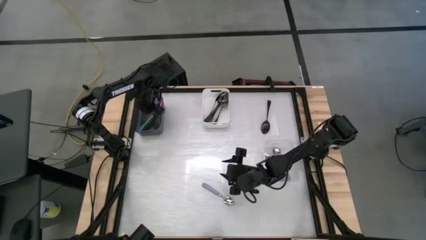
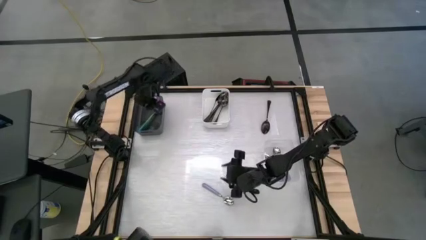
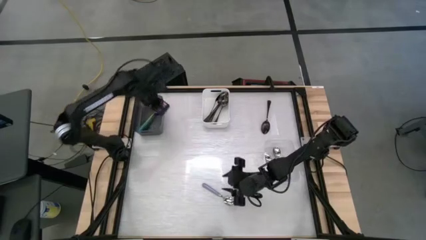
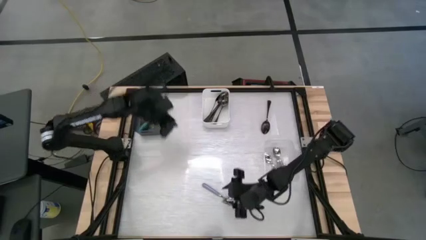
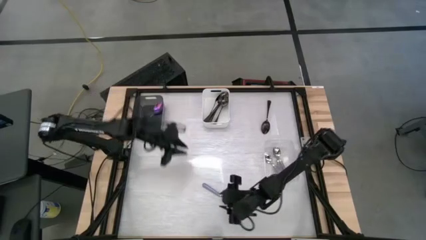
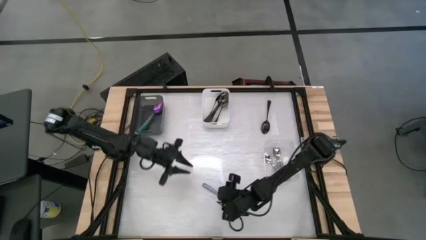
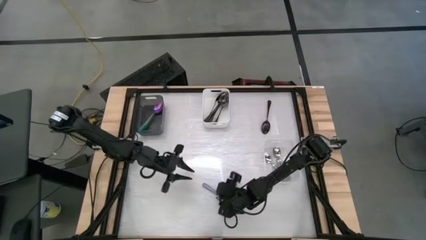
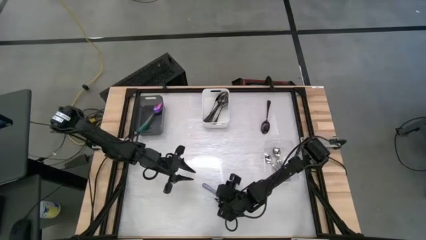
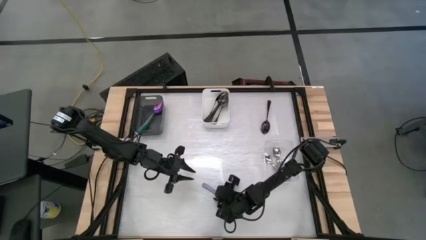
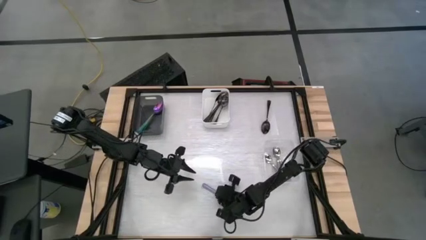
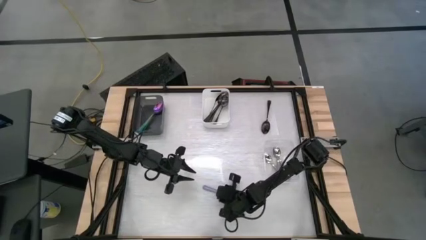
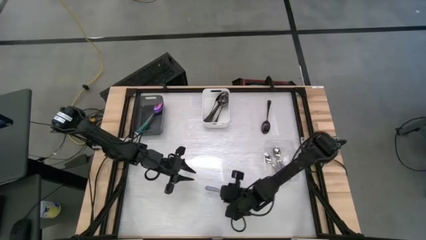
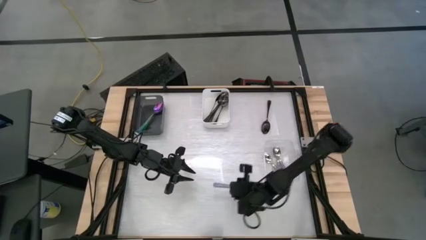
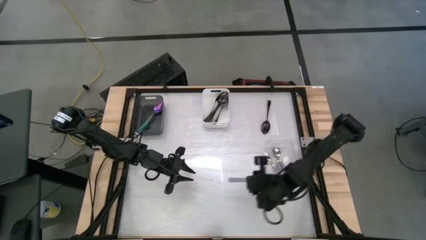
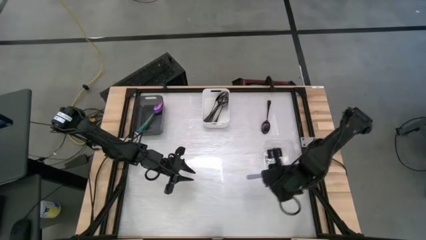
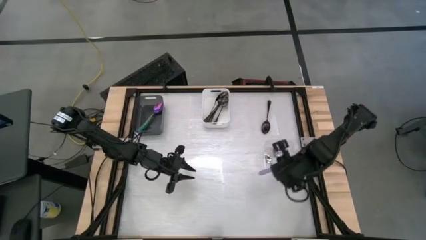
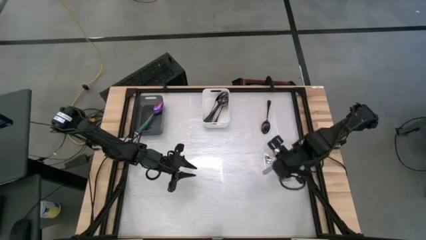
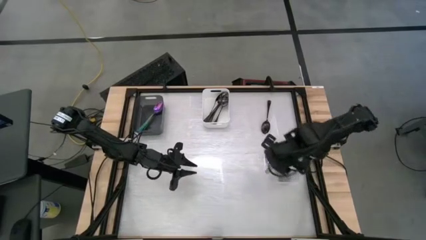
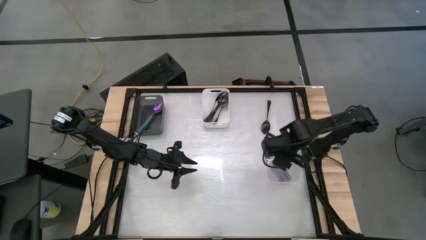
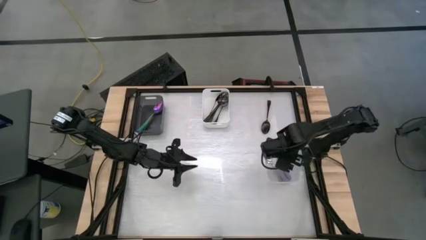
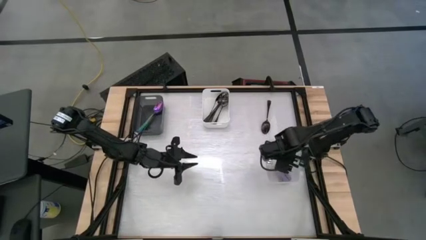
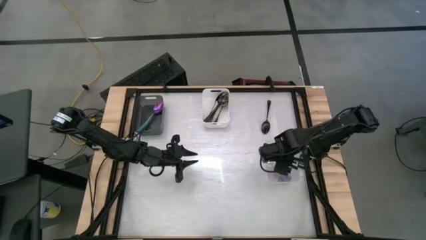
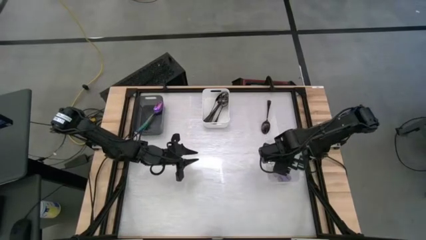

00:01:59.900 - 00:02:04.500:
Task: Sort silverware by color (type)
Put the violet spoon into the transparent bin

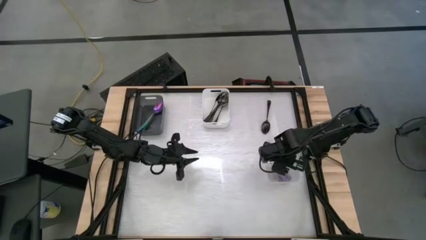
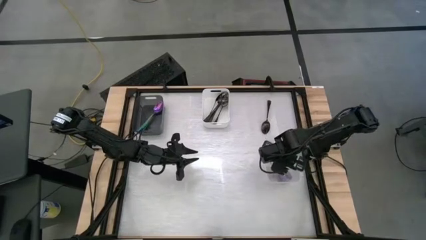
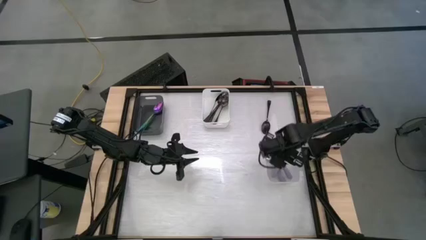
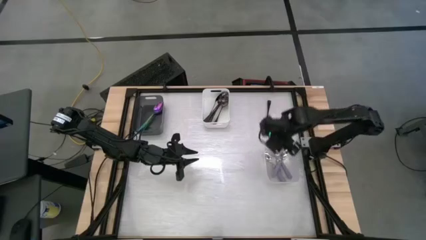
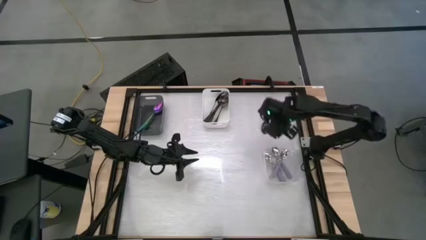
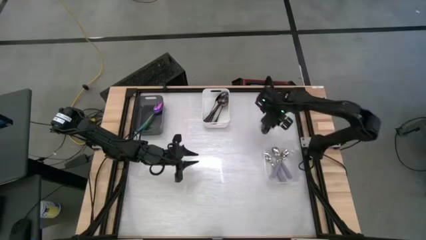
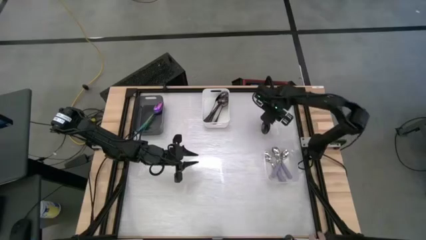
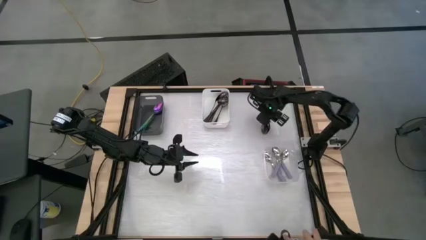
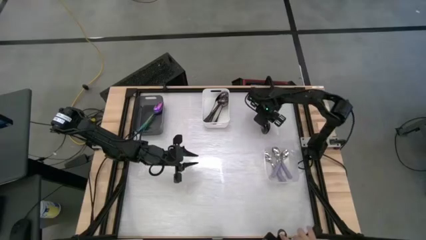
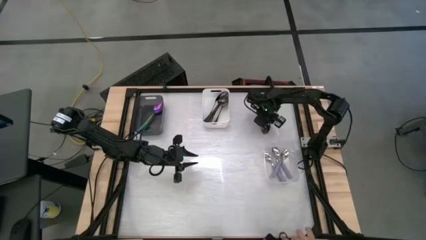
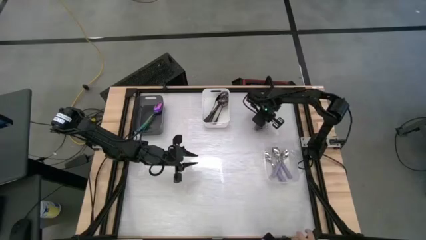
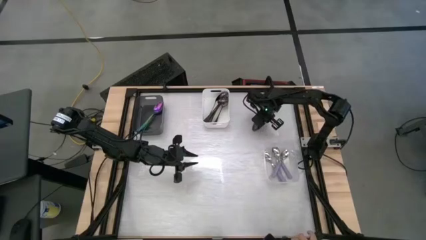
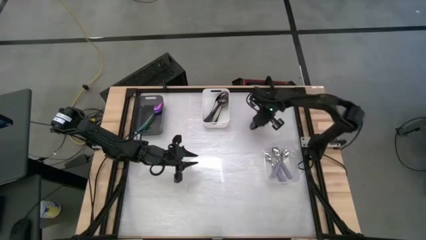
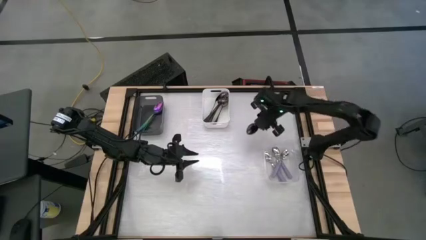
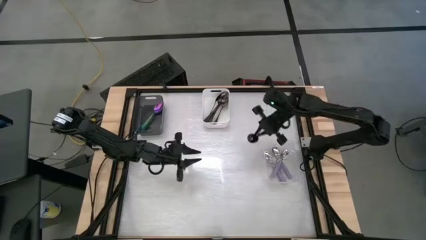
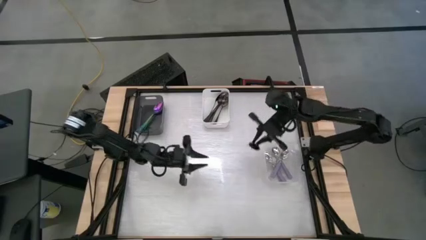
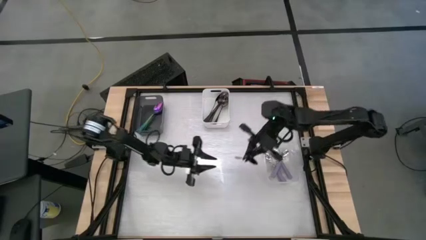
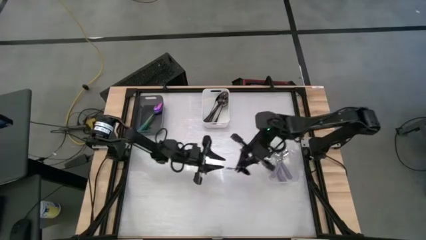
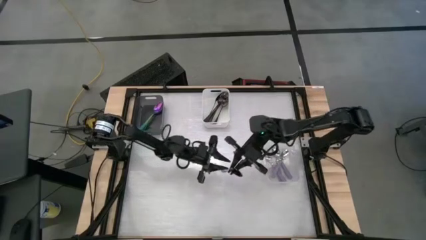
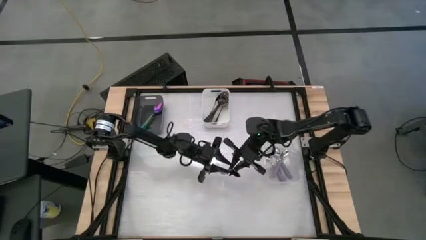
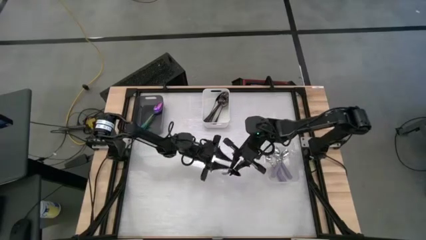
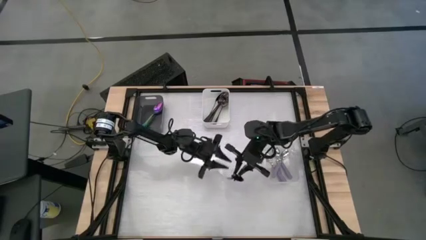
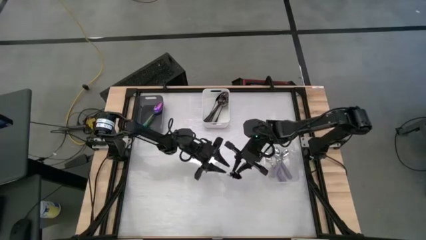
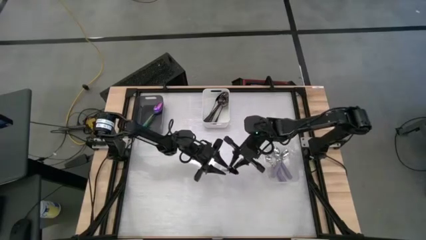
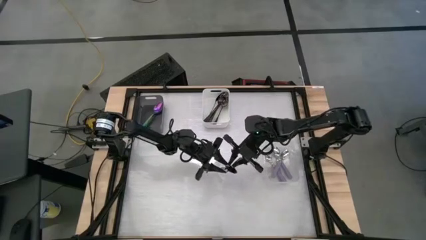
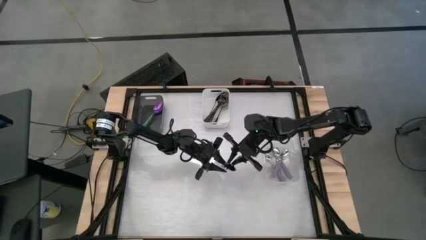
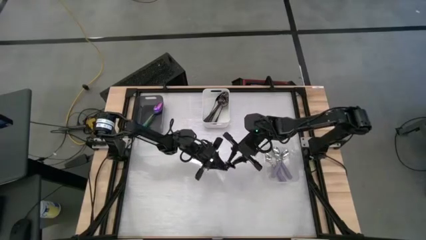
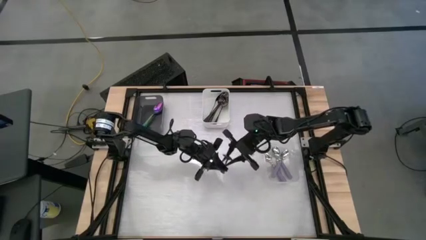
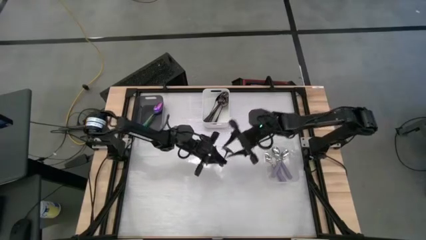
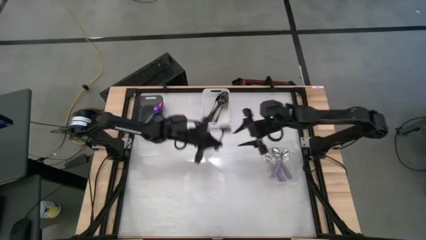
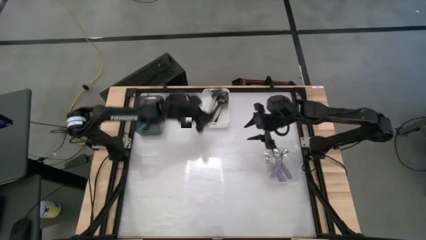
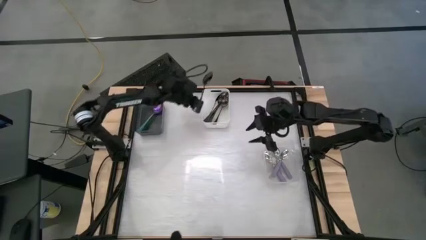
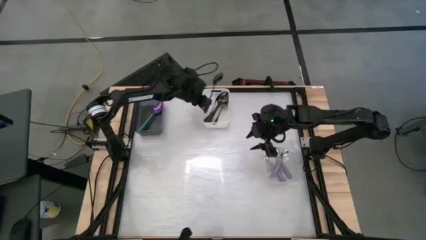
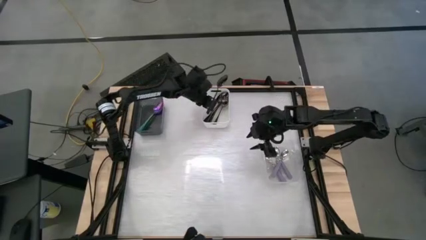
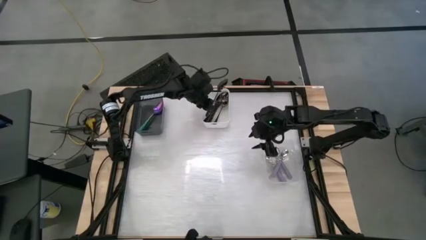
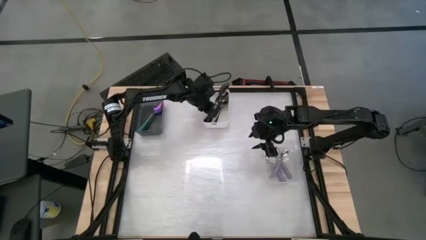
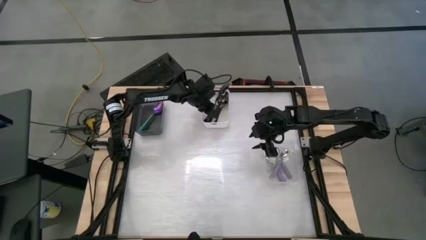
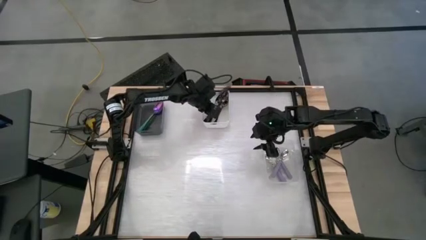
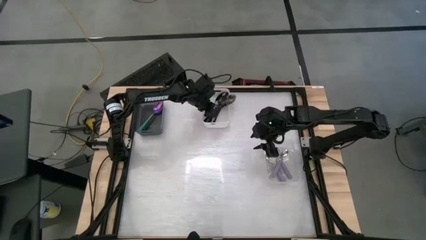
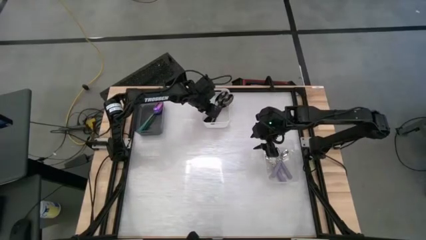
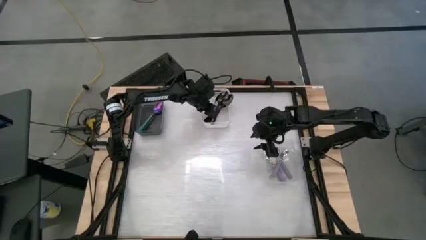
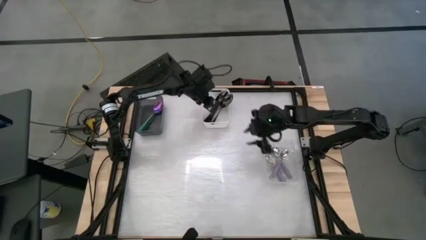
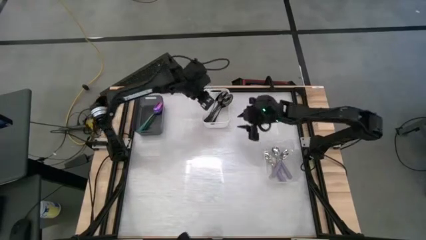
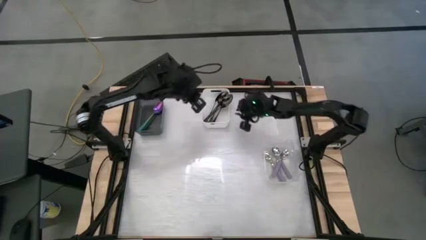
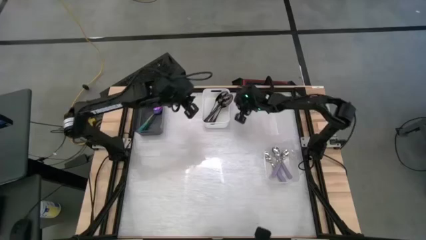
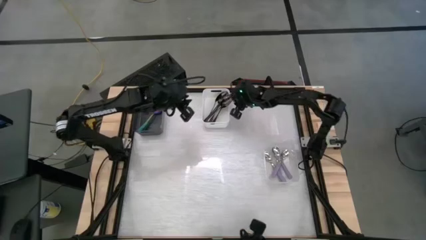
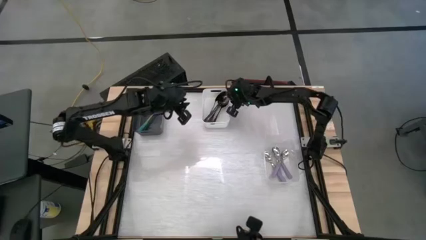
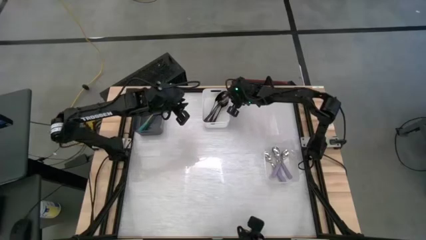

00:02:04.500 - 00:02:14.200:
Put the black spoon into the white bin

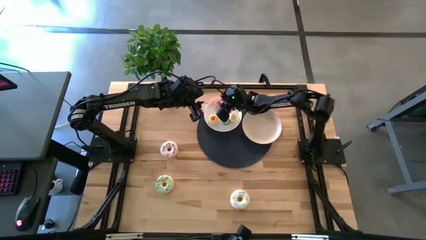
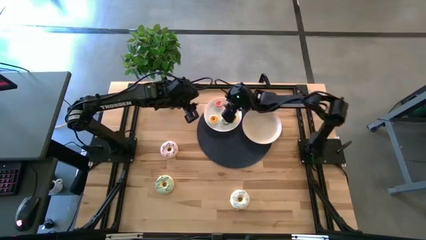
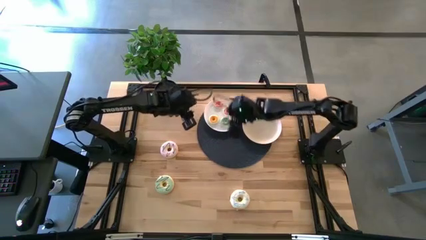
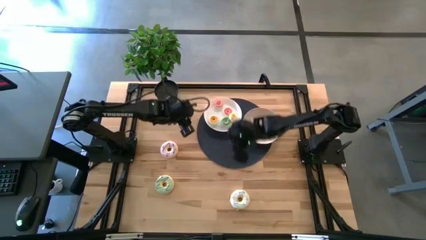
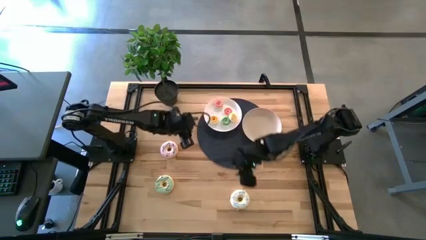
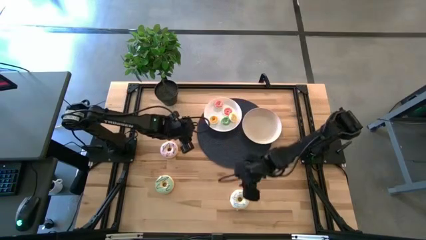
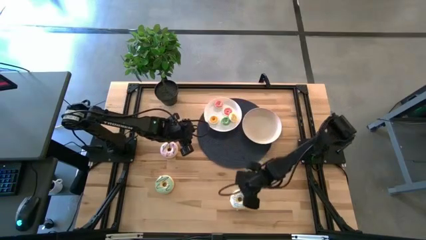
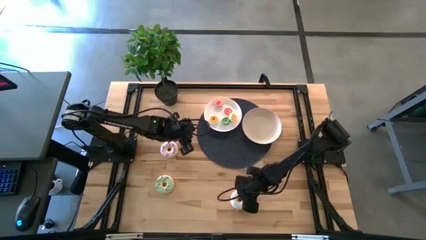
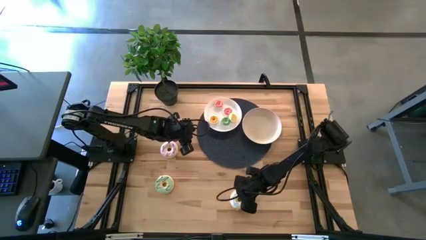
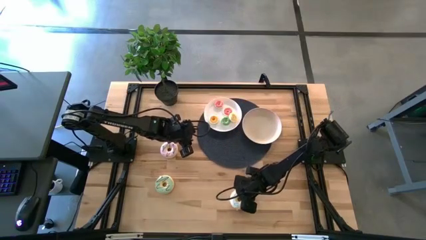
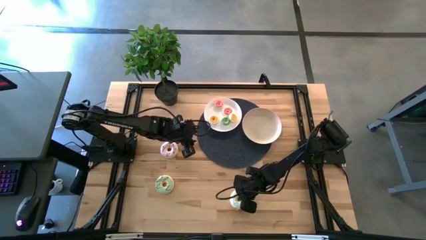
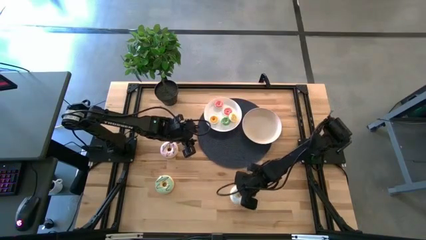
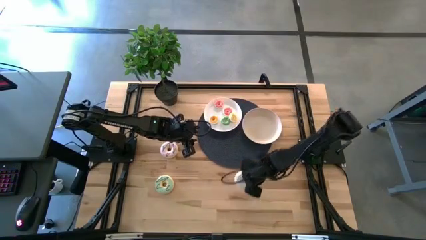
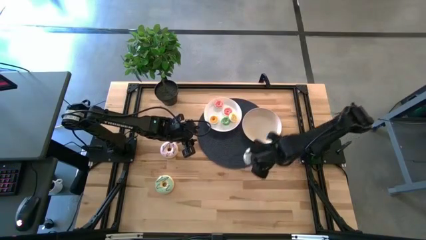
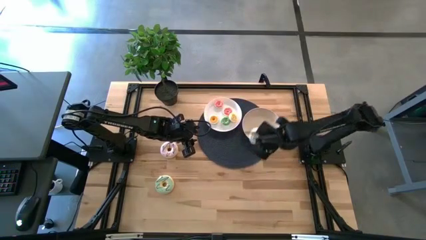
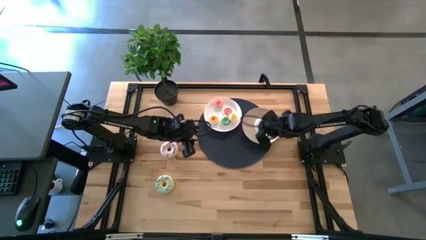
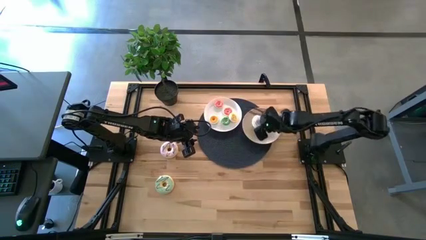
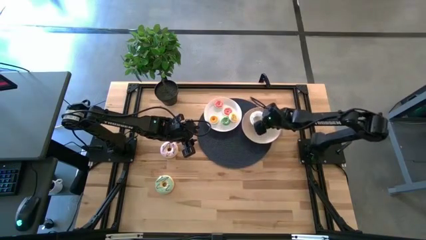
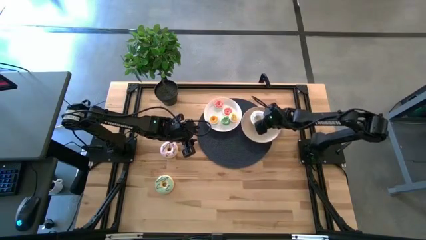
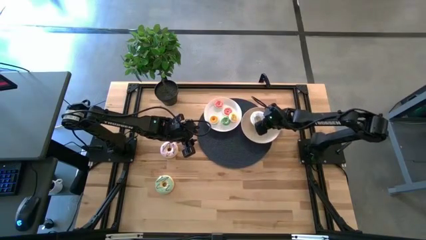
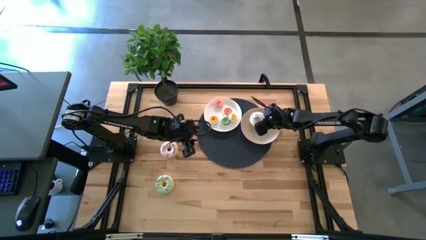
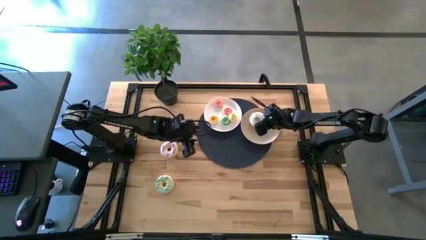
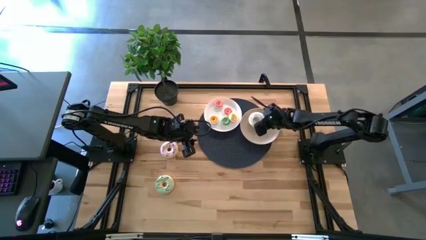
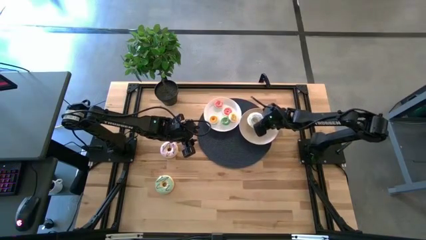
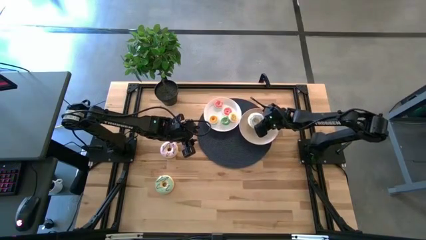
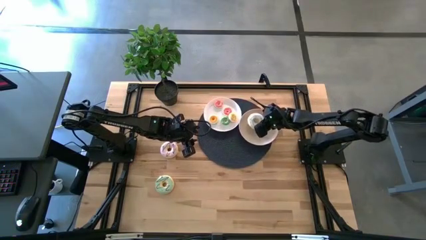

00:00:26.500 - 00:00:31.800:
Task: Pick & Place donuts
Put the large white donut on the gray plate
